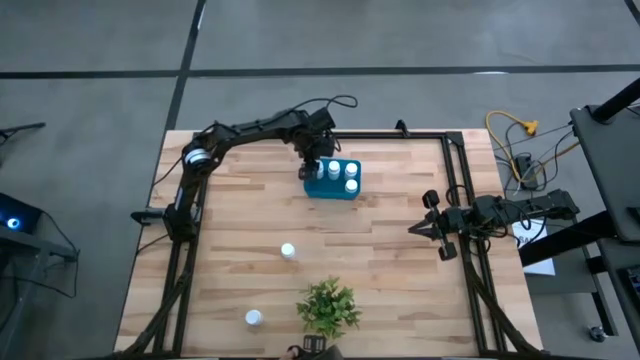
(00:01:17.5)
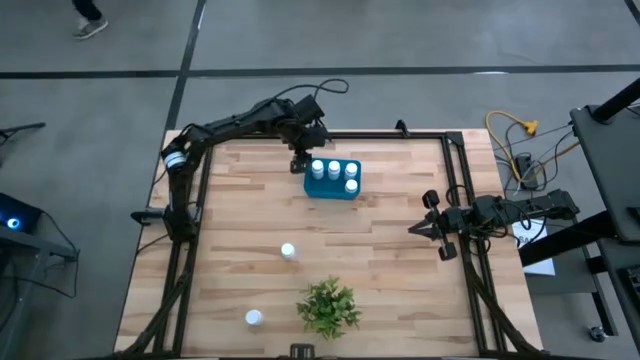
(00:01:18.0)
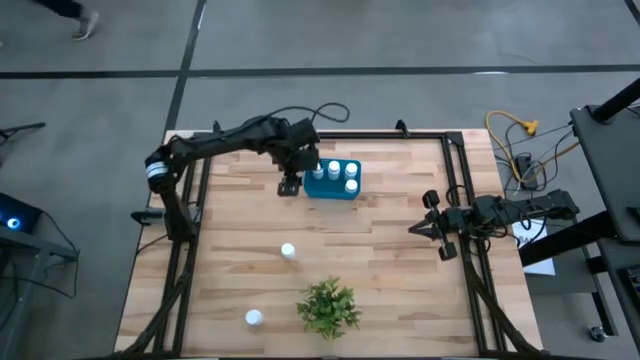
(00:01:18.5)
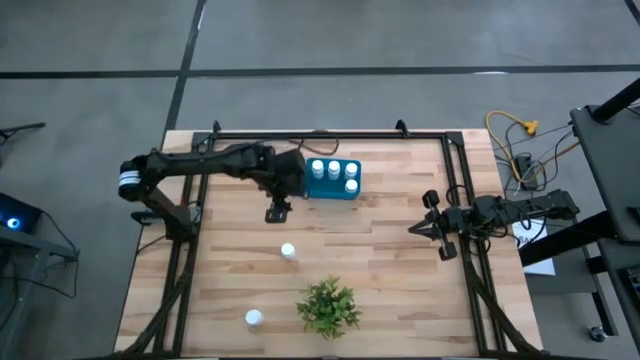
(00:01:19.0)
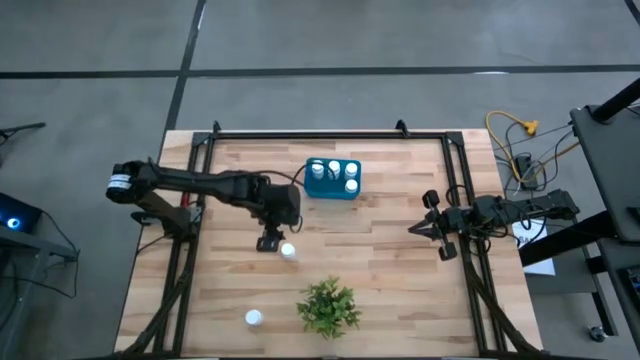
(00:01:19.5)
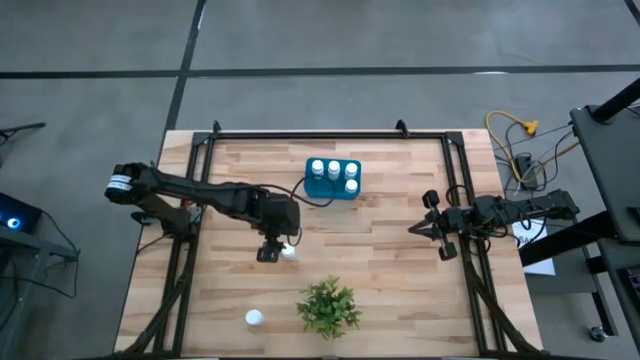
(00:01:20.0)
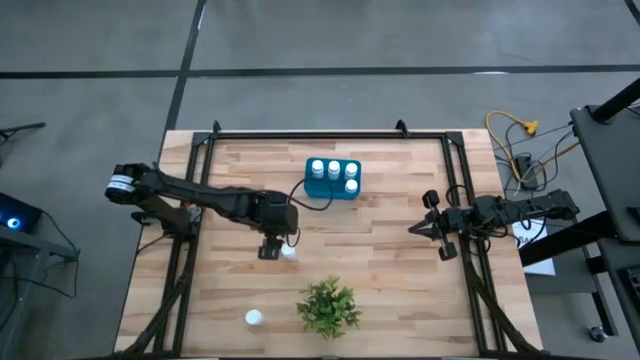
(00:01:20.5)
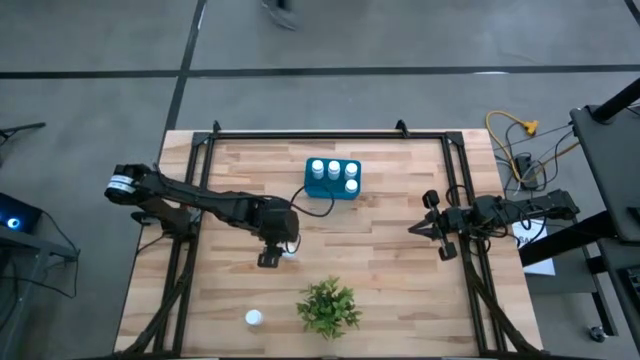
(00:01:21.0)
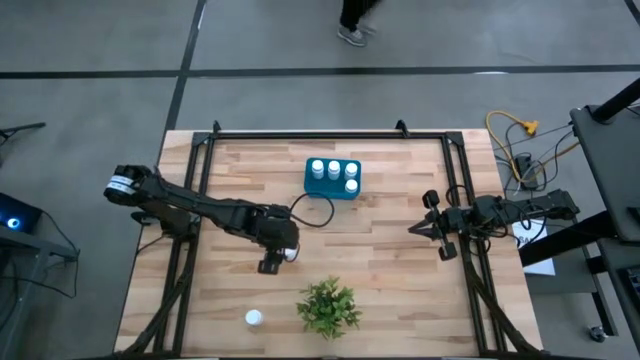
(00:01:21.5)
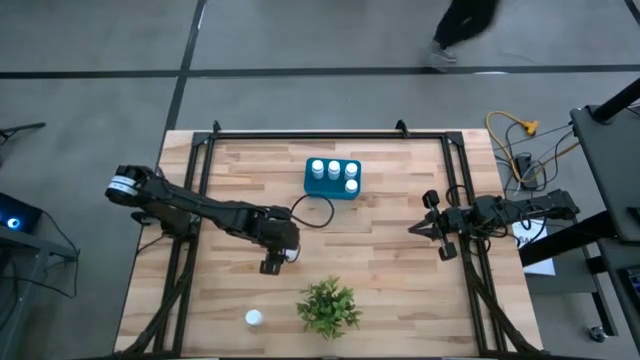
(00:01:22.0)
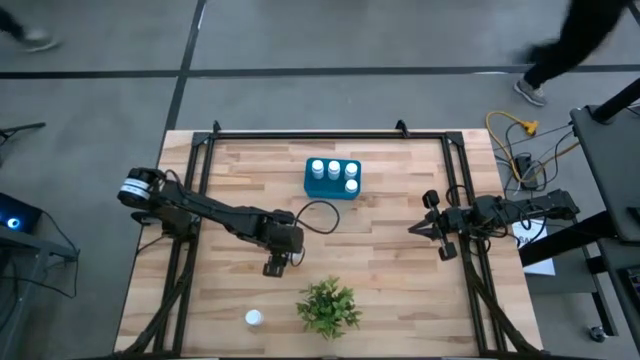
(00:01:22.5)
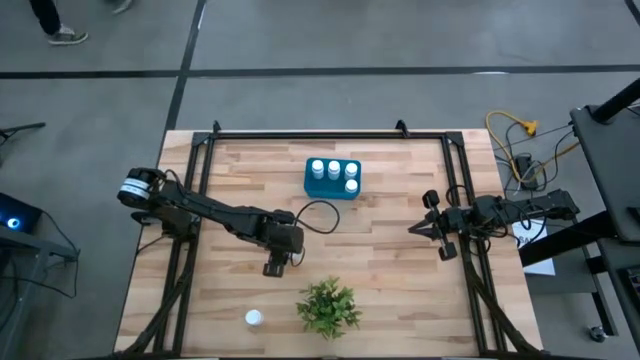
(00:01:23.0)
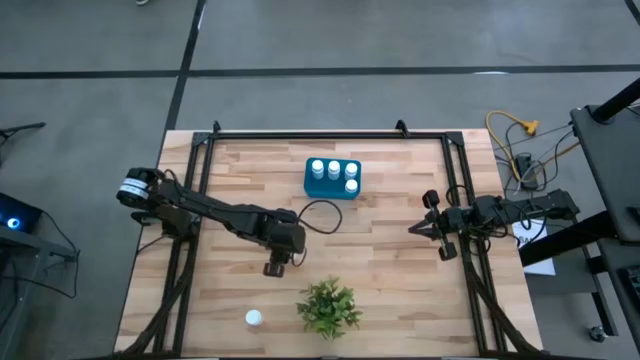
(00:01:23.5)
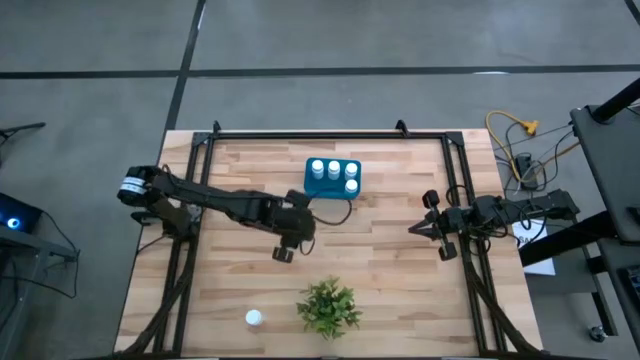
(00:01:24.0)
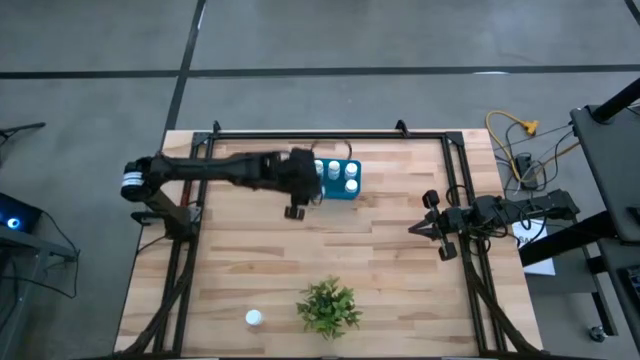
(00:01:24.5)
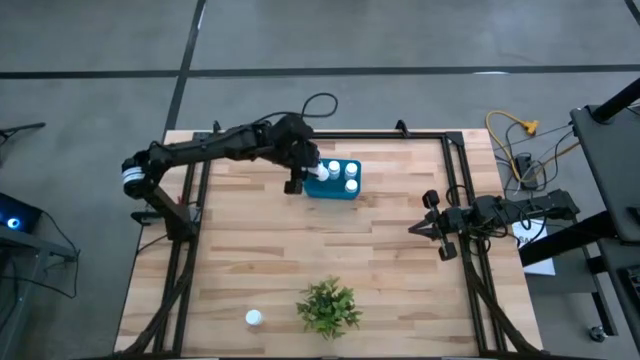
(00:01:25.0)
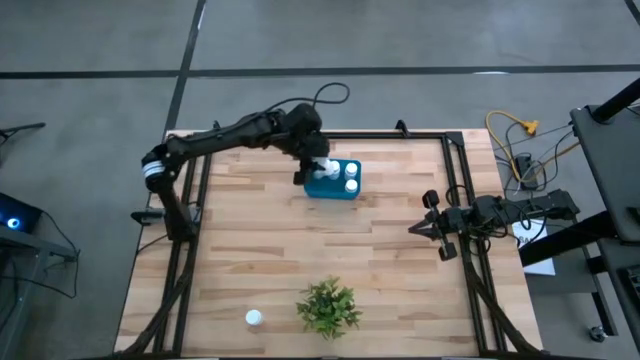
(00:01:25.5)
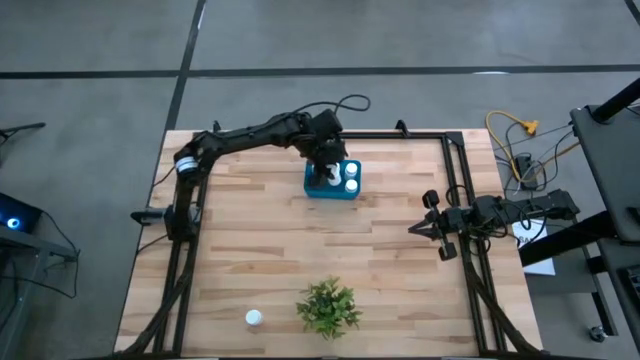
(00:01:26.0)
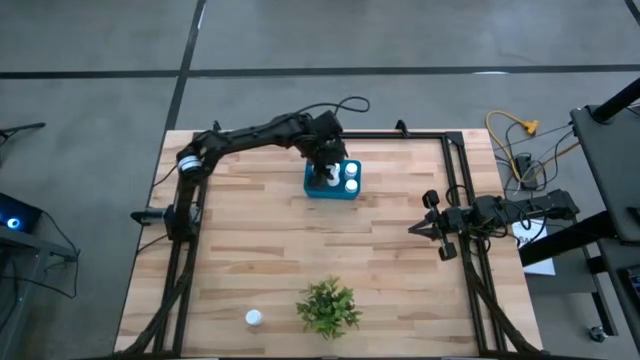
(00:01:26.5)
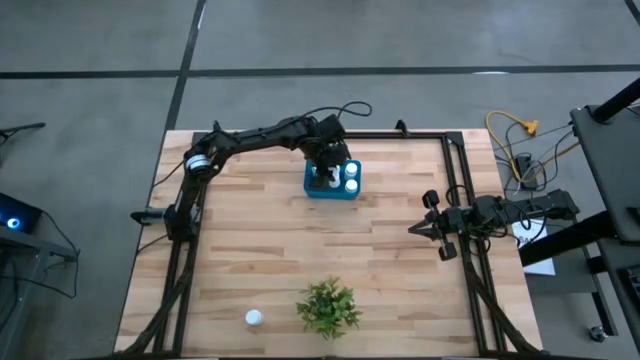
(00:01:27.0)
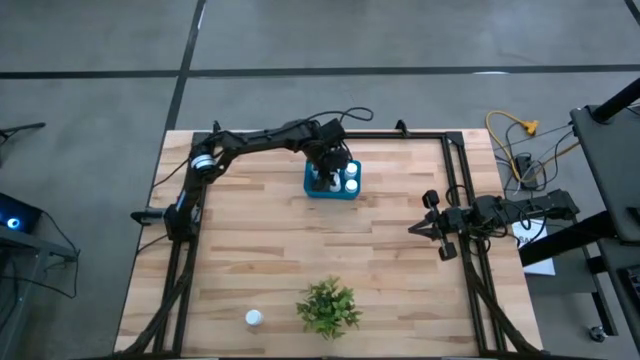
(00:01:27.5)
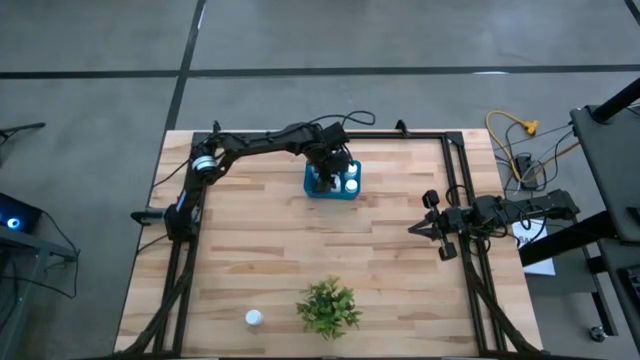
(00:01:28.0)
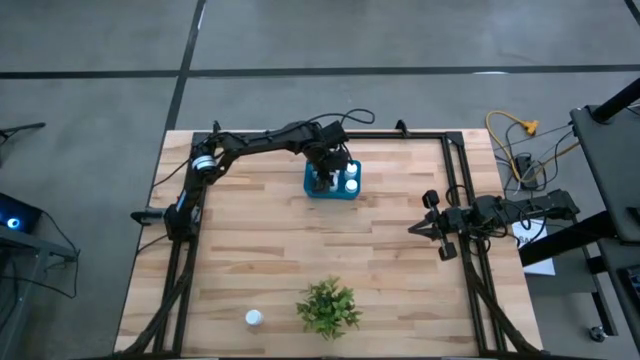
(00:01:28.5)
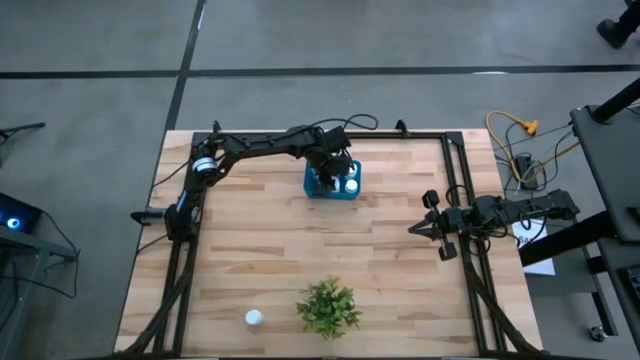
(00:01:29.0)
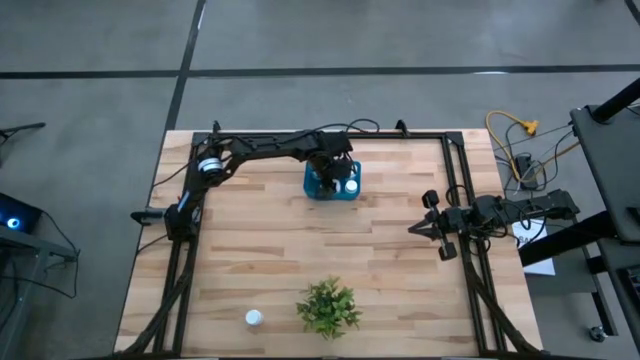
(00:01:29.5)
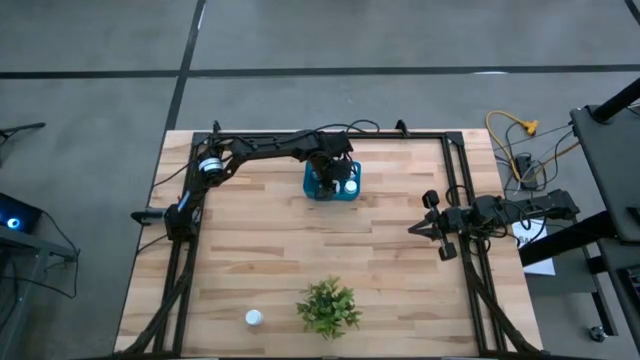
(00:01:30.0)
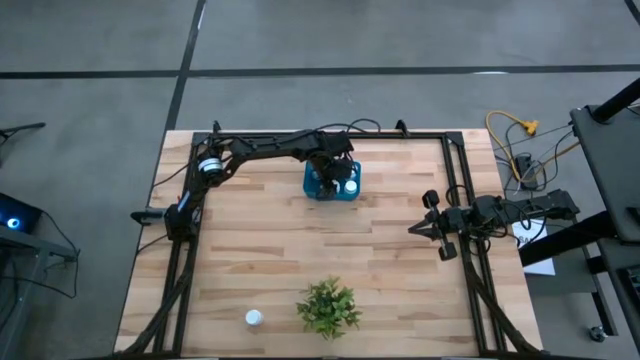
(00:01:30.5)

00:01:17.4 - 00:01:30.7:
Task: Pick and place pill bottles into a basket
Put the white pill bottle into the blue bin
